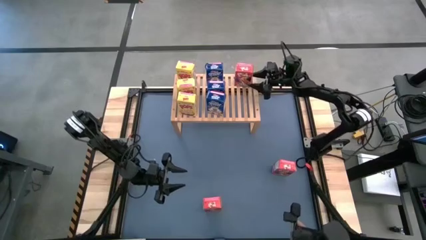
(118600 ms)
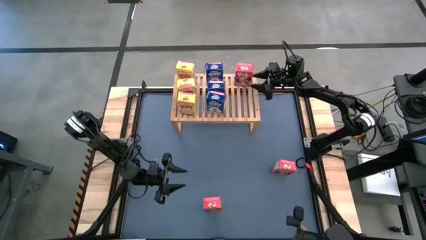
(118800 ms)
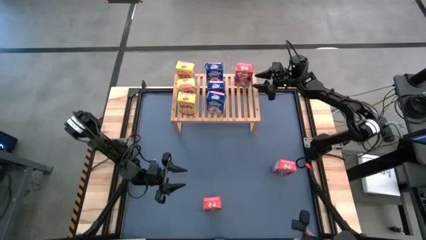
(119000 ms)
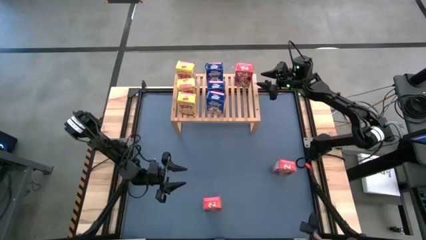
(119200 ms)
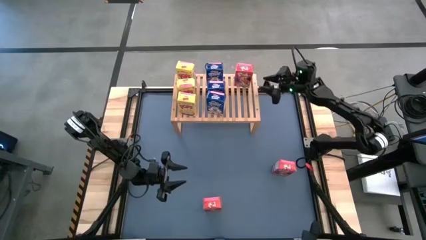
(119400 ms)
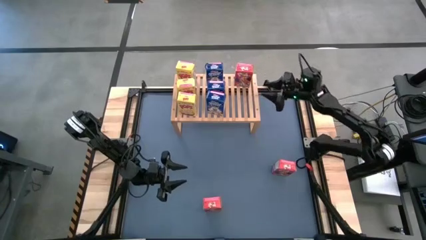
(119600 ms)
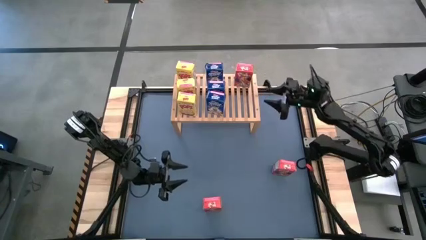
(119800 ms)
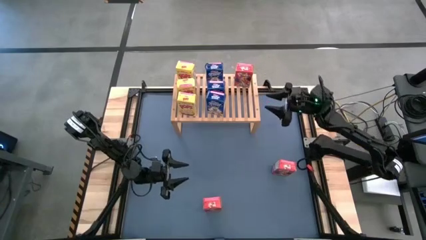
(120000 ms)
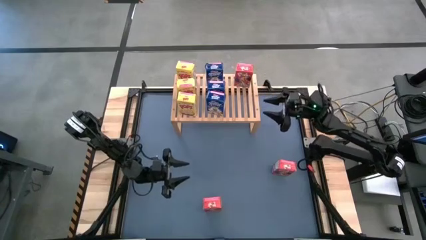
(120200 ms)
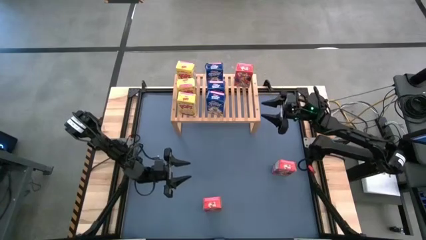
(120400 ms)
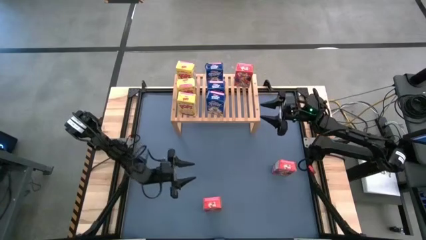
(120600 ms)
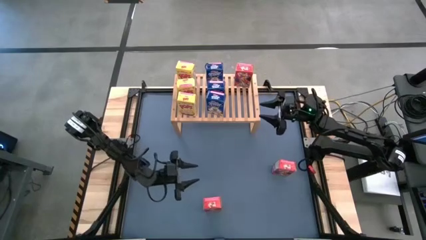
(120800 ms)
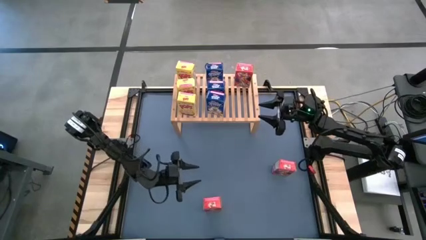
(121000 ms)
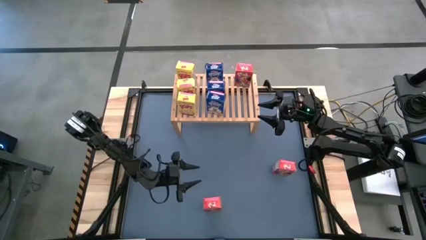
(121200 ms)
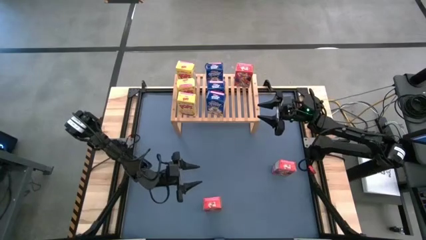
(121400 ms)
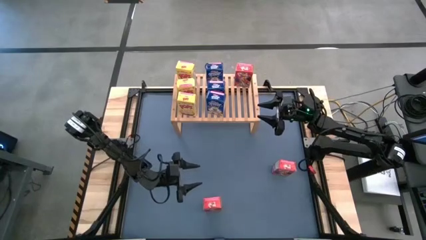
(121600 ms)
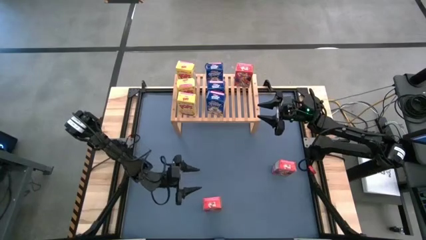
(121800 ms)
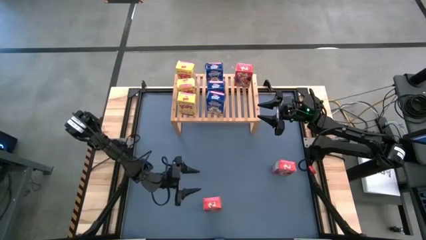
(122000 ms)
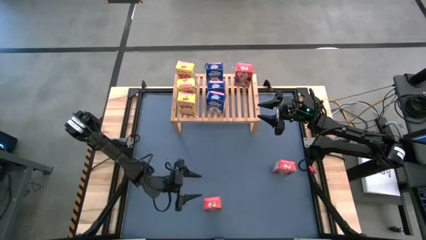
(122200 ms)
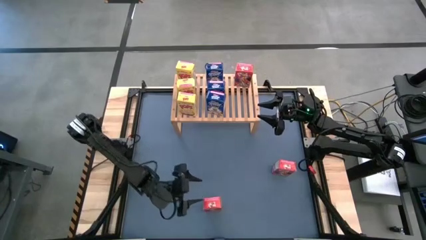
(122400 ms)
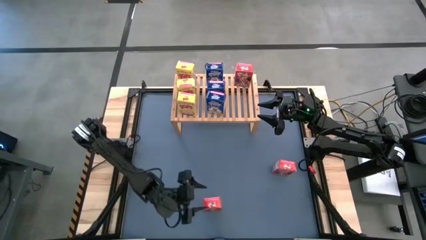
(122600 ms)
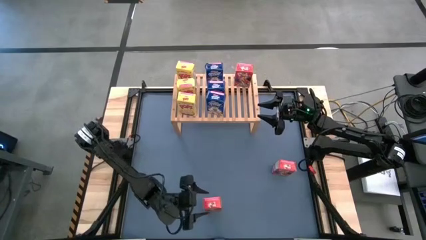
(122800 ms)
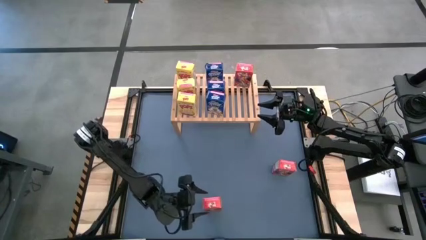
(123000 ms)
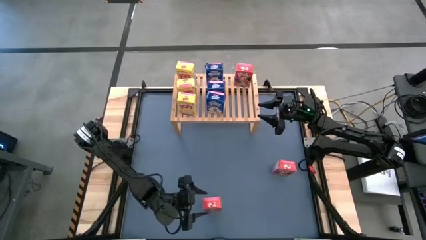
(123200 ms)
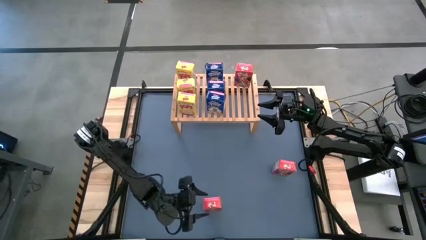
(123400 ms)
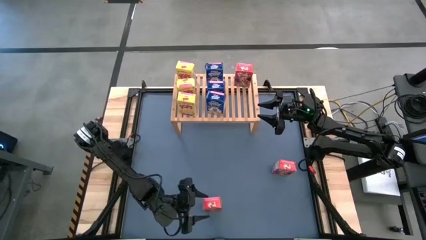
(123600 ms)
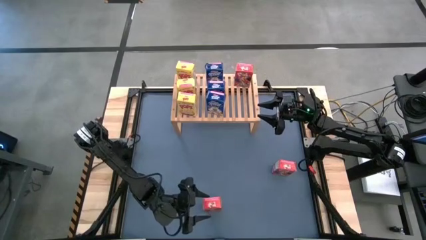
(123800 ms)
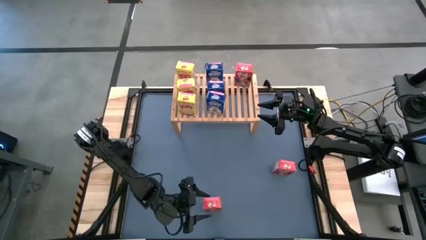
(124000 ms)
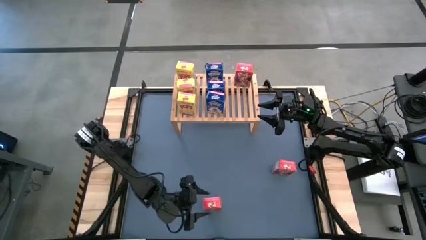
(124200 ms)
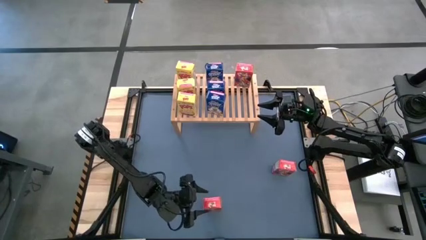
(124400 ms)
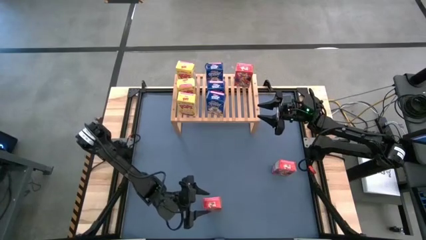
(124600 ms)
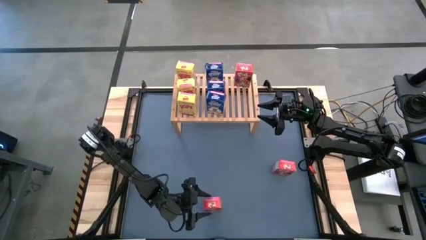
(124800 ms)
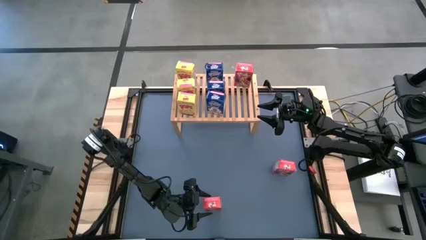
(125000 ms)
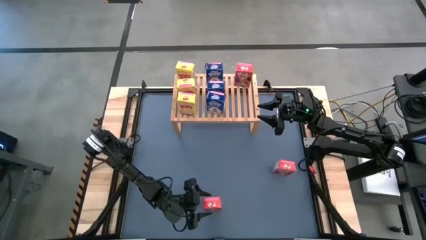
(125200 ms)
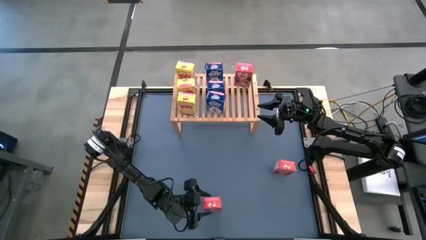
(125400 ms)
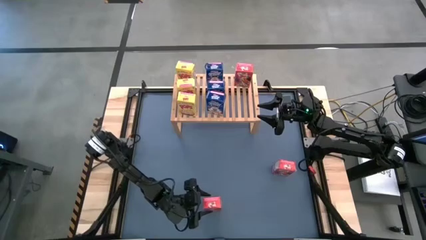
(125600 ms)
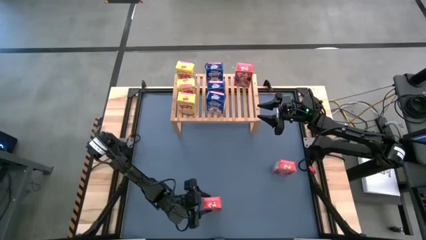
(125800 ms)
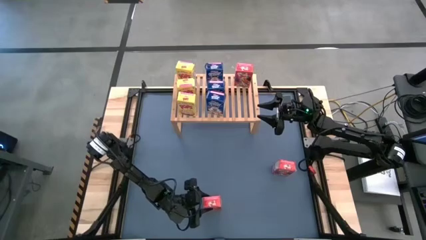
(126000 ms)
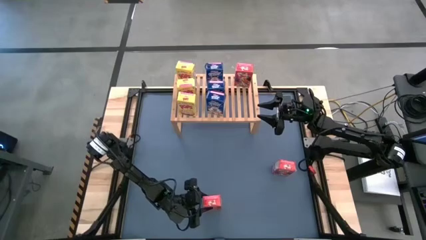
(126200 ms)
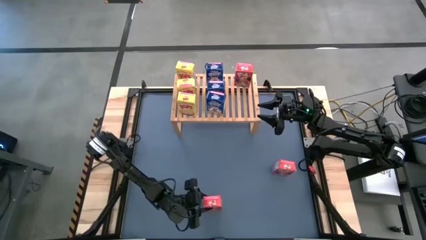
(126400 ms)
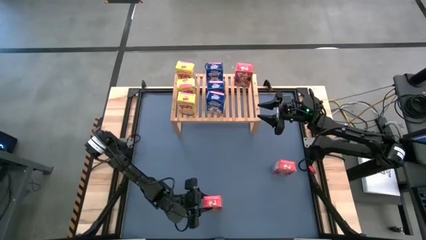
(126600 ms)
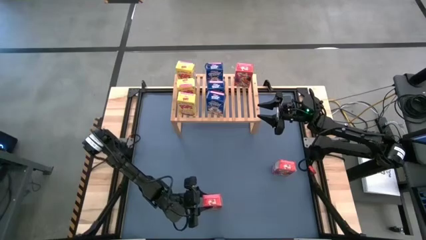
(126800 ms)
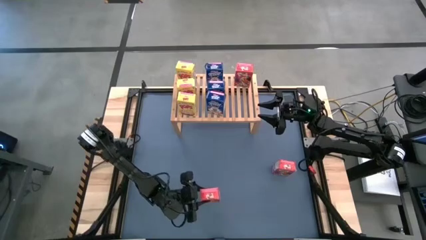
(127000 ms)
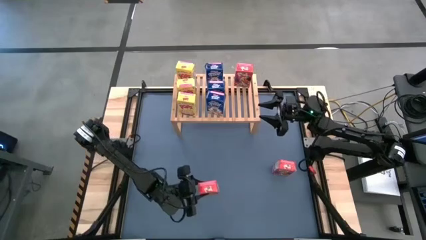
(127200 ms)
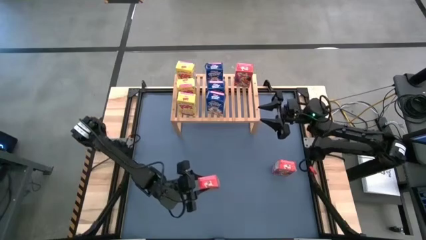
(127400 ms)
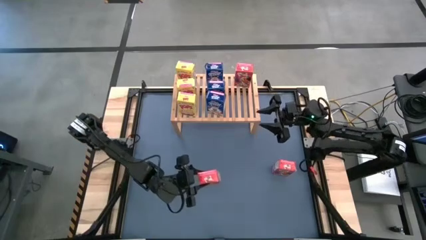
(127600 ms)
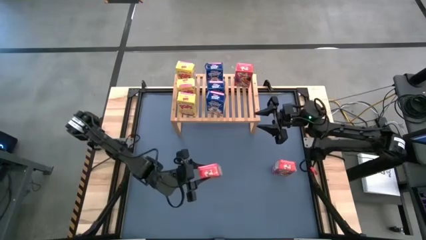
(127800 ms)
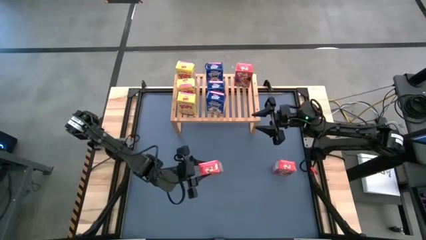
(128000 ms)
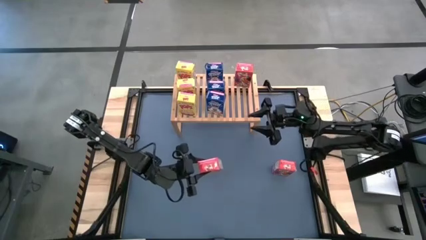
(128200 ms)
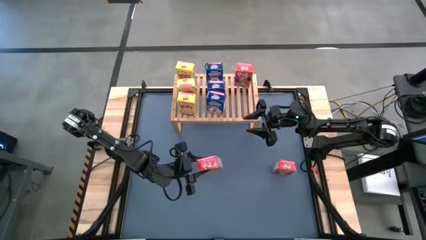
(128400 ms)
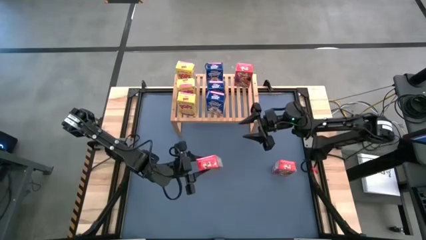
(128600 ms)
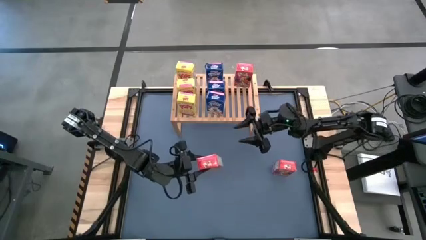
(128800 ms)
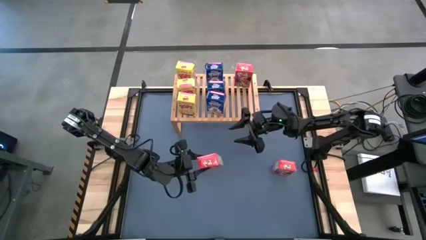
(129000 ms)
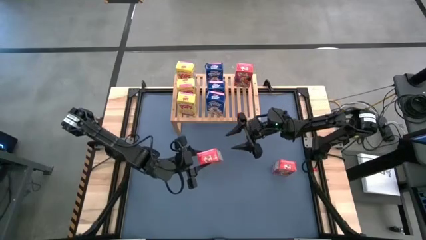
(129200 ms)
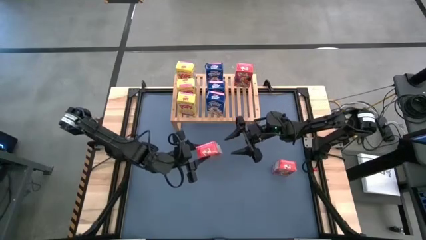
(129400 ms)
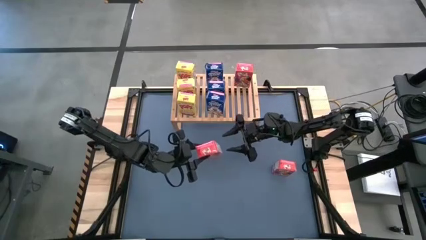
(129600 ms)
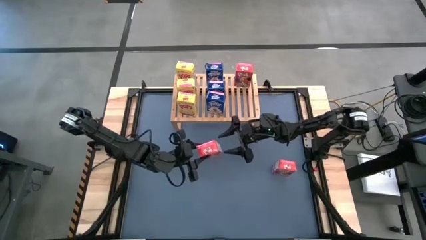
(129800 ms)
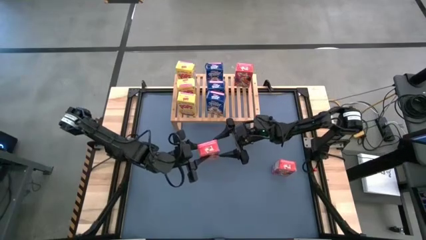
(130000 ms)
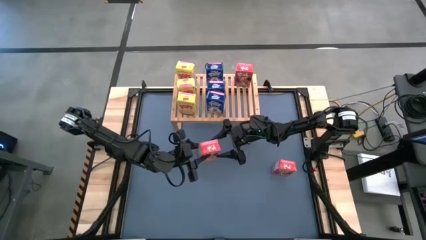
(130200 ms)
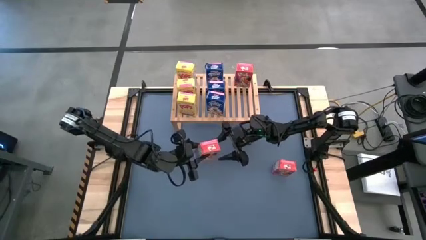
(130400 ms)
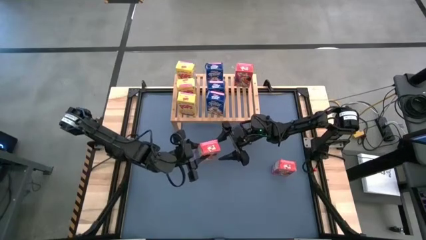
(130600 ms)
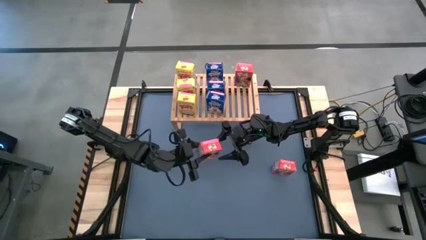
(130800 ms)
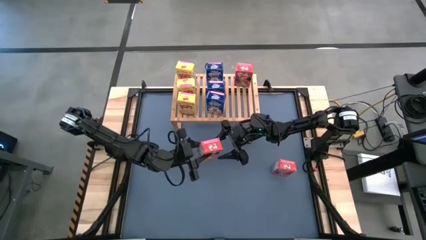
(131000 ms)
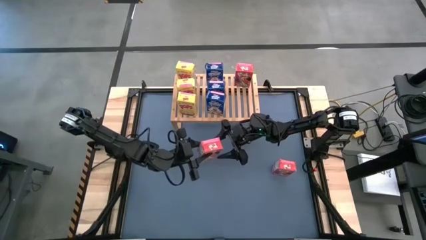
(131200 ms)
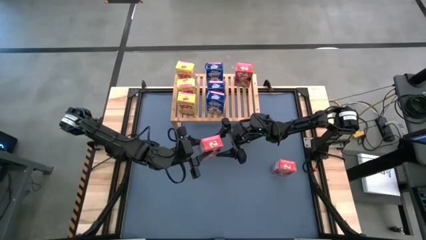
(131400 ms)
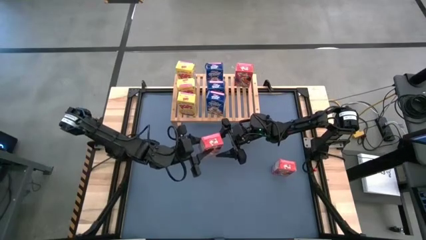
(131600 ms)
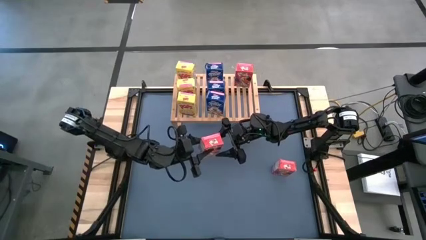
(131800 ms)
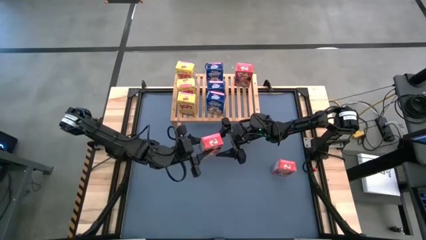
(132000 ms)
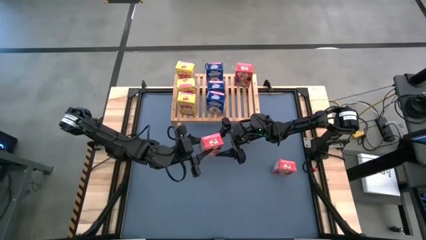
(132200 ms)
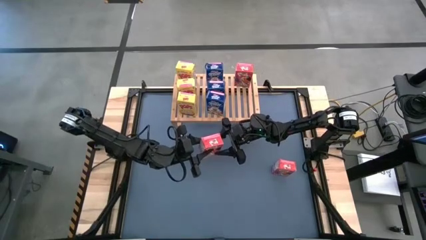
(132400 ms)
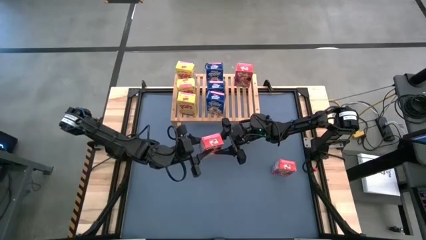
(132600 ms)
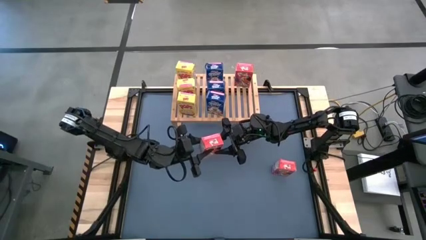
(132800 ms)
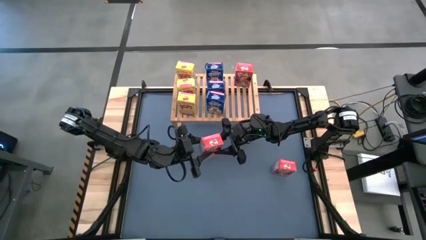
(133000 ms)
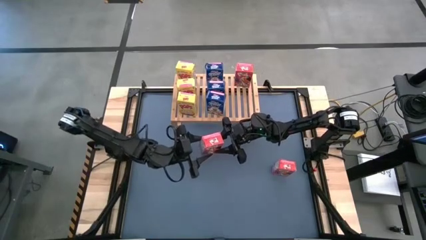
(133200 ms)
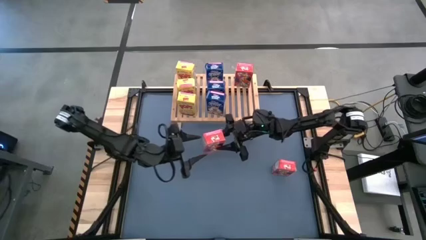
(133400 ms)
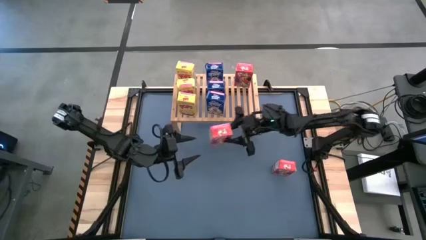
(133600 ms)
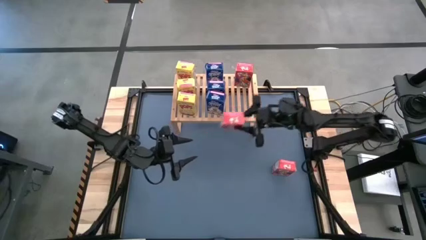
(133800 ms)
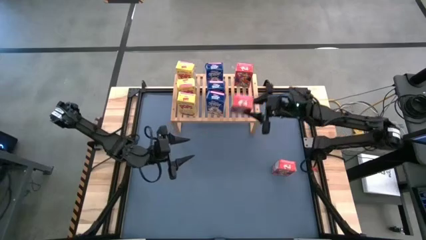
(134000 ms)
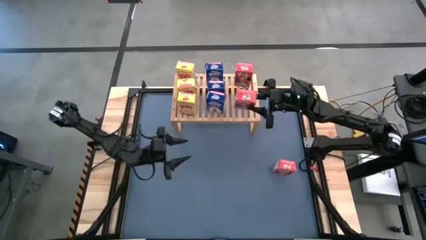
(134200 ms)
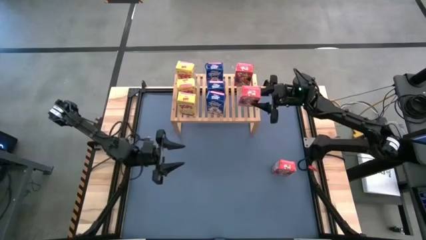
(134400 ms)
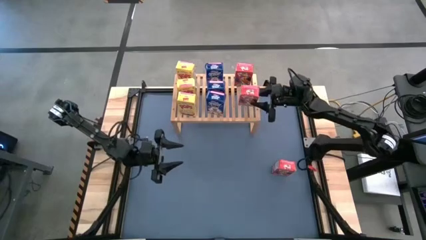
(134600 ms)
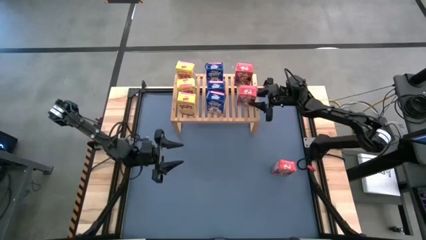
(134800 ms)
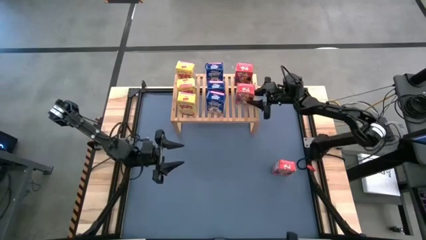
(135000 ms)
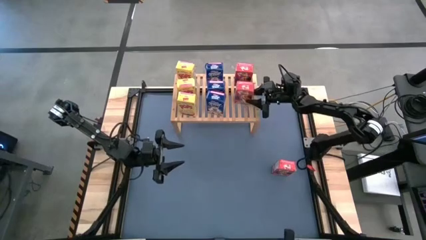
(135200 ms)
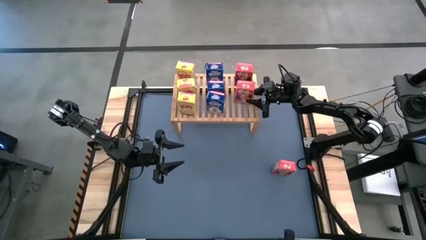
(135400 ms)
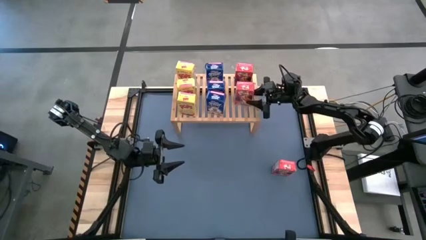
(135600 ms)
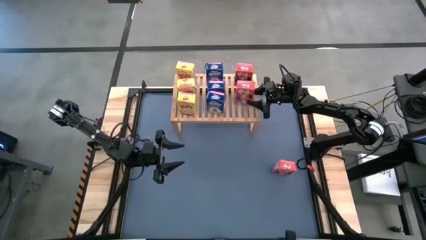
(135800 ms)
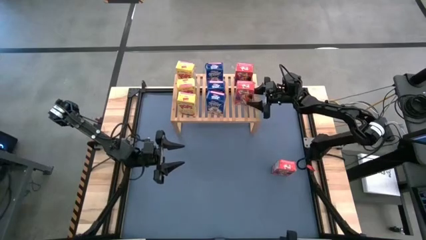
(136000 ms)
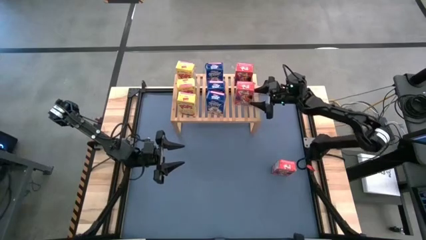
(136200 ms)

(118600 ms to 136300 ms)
Task: Stack cereal on shelf
Put the bottom red cereal box on the shelf aligned with the other red cereal box
